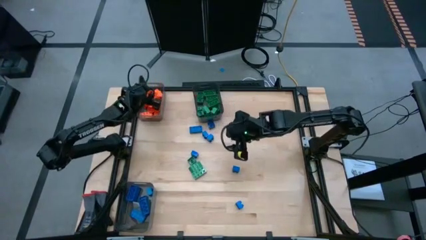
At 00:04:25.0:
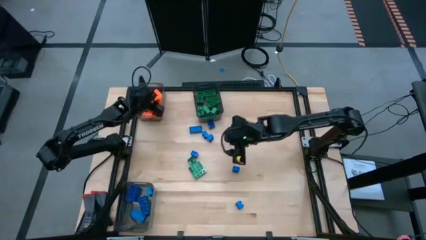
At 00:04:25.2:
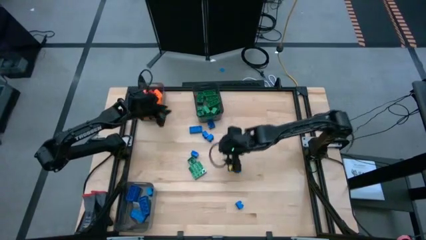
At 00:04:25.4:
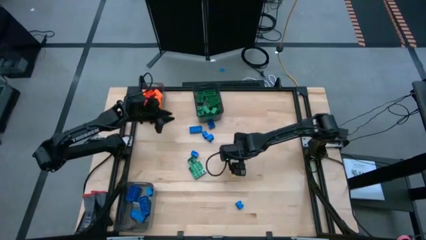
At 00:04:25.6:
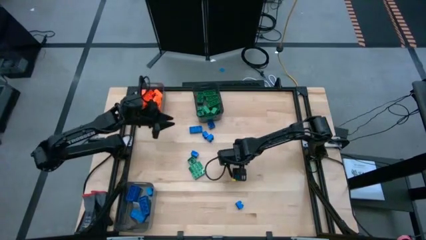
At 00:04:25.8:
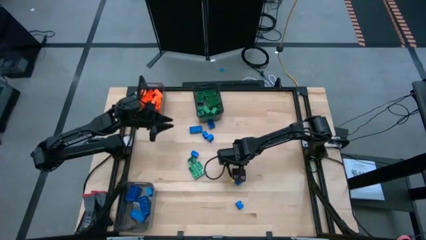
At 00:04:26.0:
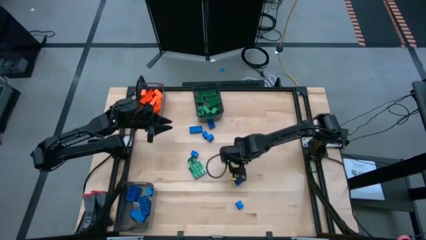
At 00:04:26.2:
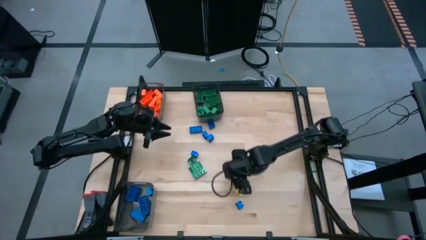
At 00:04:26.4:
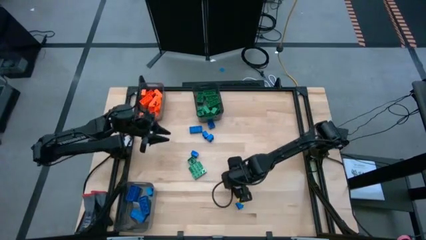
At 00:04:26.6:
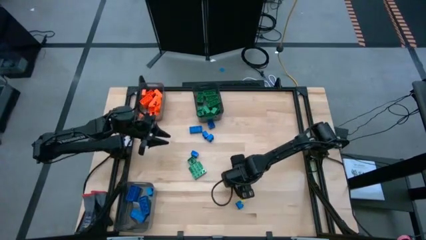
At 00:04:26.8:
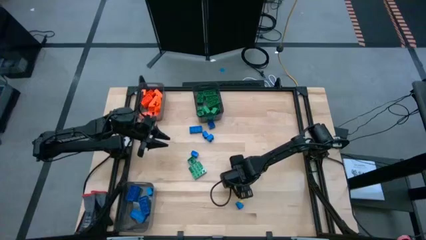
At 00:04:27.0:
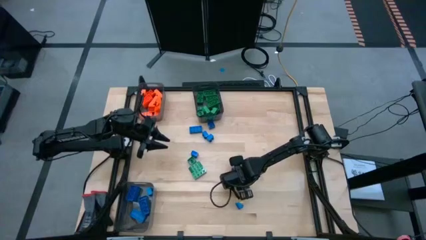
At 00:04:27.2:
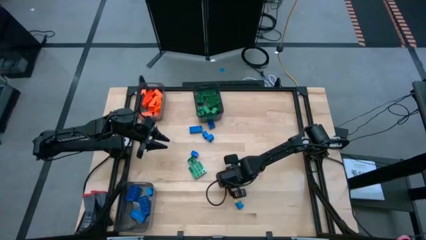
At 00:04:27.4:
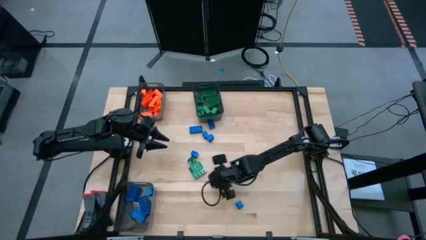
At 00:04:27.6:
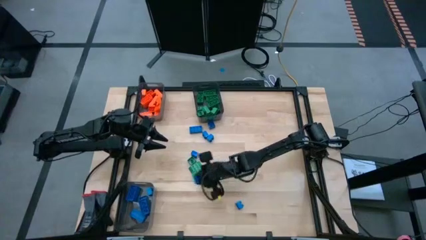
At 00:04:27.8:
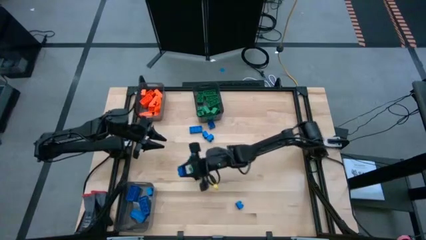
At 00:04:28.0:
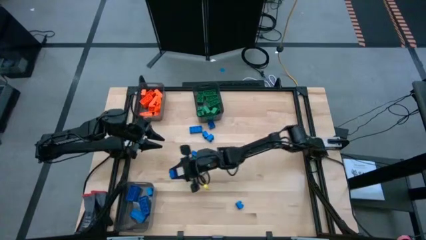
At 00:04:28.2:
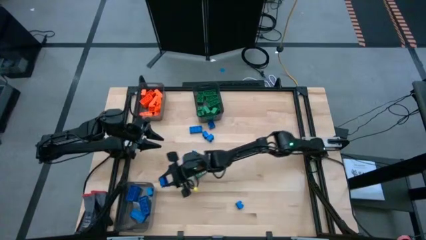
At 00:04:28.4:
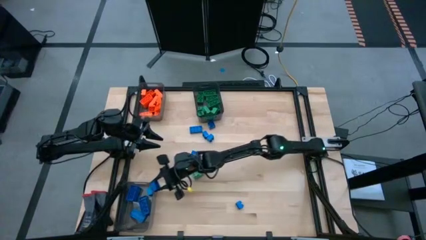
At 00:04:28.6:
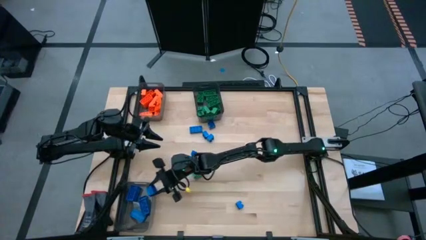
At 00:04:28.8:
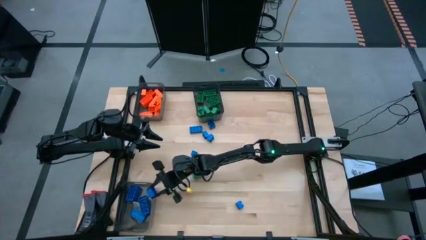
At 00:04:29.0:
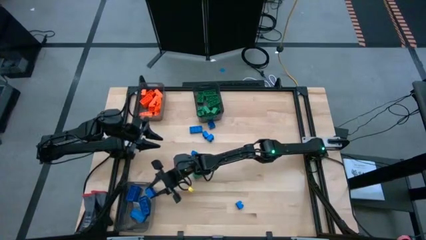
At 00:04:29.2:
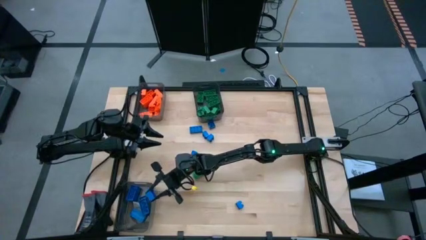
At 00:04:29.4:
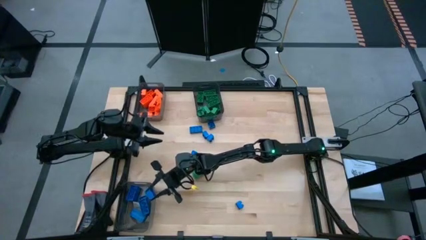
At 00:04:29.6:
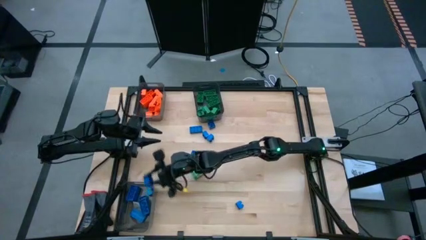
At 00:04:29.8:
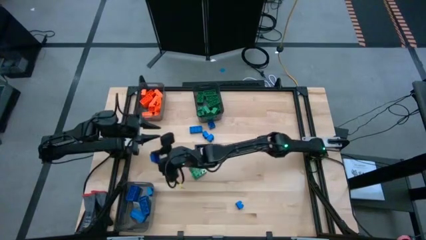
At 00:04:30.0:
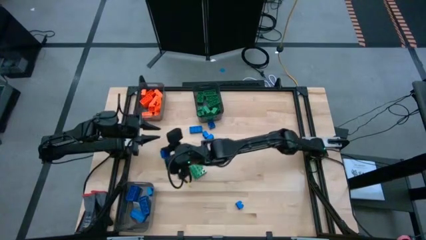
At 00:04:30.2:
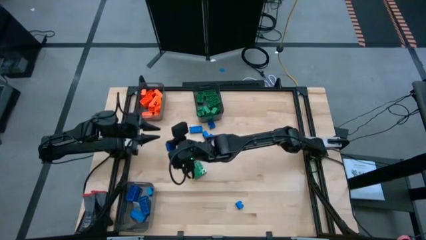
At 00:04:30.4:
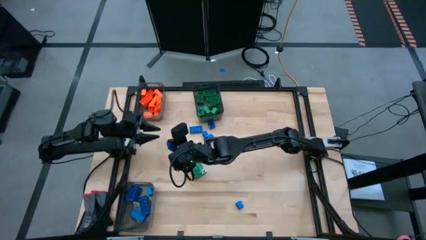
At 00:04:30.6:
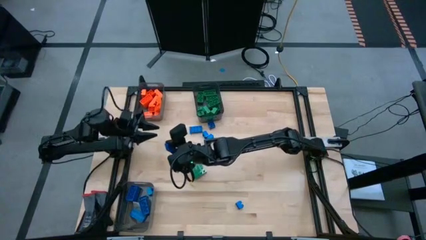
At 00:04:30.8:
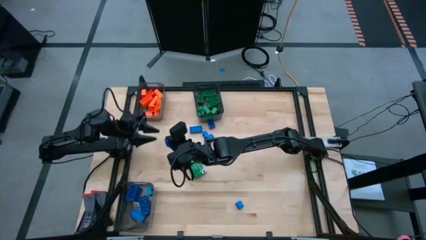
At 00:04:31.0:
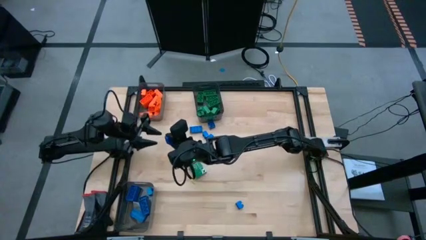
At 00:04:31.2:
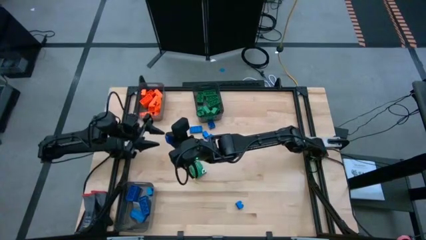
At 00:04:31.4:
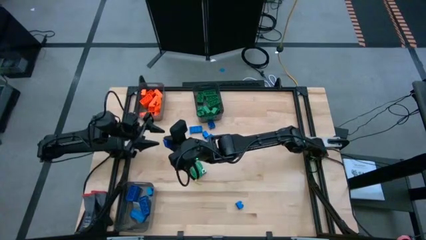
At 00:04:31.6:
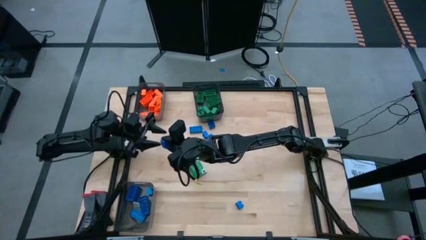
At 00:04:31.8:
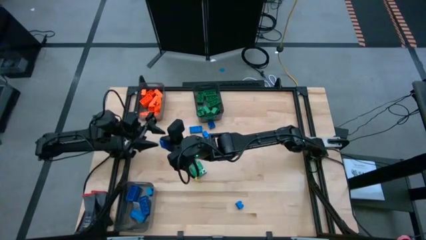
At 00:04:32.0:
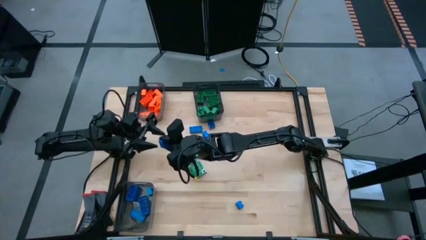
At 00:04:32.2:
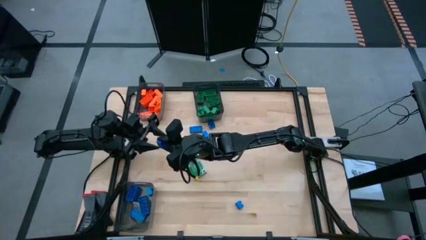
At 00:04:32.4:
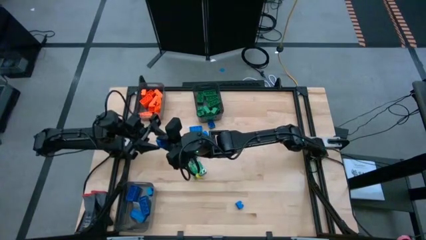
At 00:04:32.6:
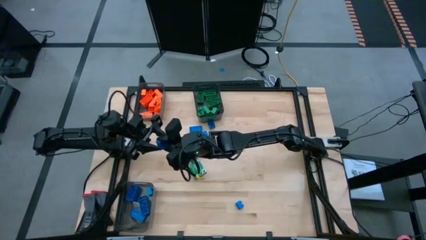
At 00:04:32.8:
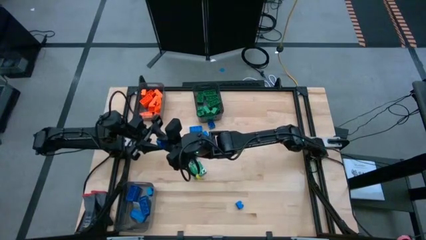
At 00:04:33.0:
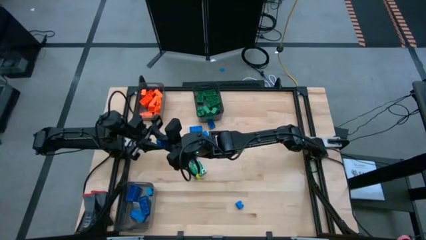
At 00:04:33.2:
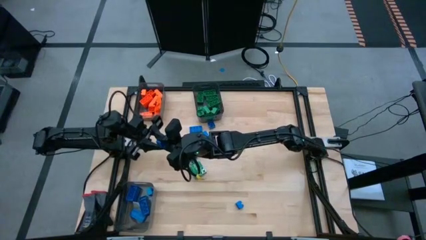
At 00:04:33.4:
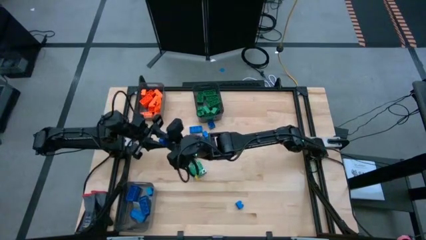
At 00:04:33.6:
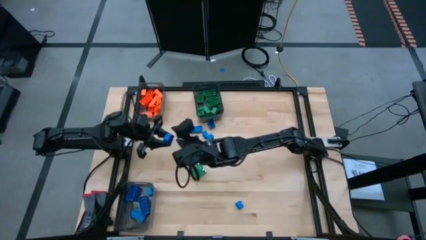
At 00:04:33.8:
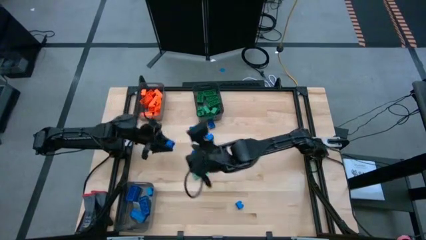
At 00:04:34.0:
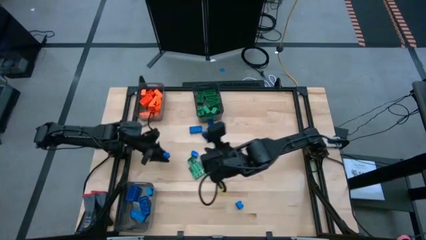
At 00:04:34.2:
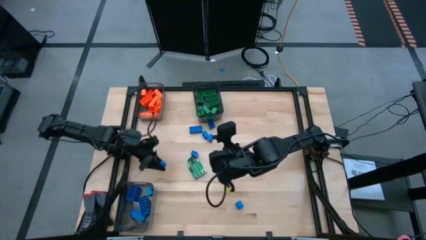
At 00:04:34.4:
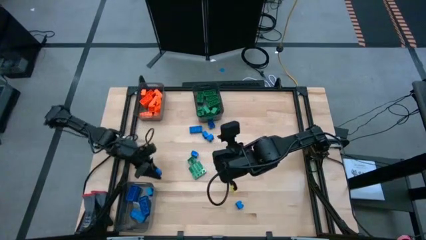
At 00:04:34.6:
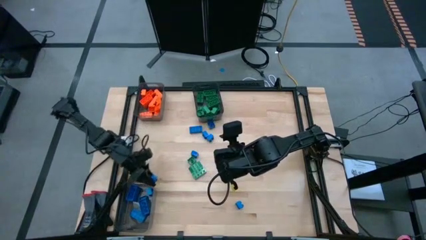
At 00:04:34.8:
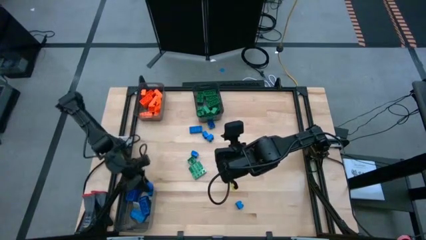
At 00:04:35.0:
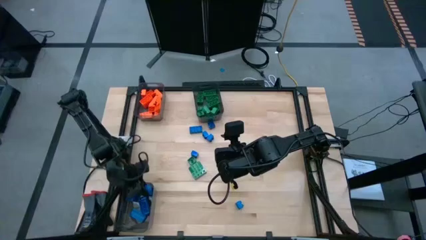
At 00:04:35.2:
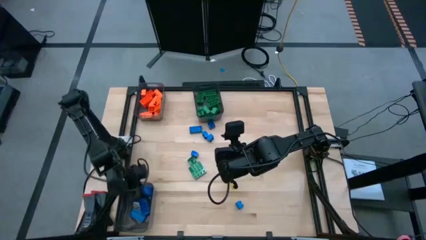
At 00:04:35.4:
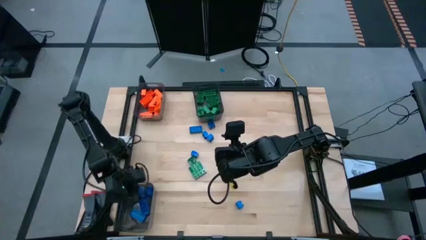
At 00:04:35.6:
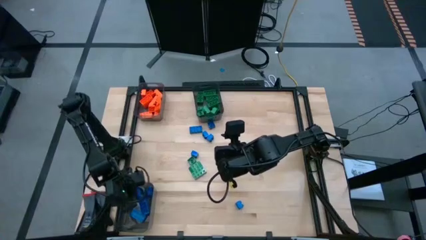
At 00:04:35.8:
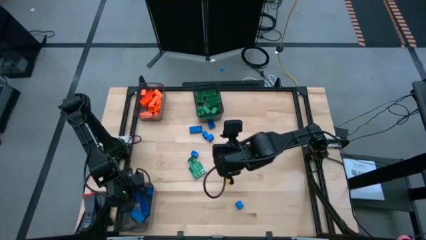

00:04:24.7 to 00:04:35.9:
Task: Sort blocks
Put the blue game piece into the bottom left black transparent bin

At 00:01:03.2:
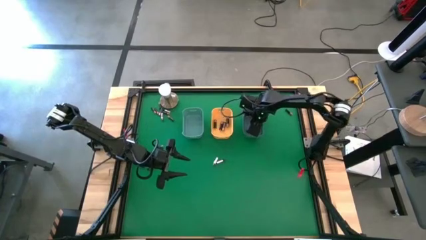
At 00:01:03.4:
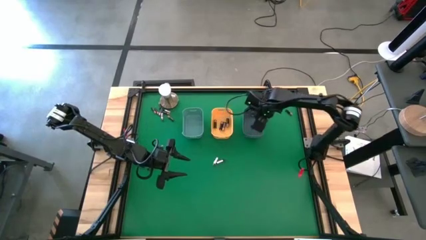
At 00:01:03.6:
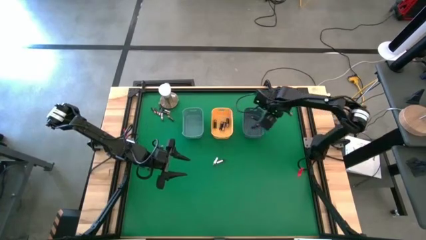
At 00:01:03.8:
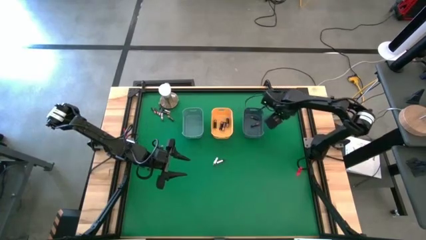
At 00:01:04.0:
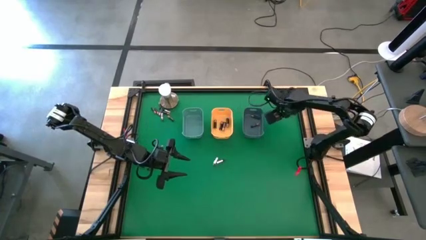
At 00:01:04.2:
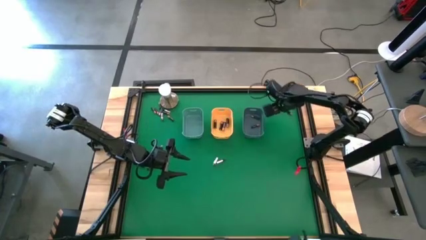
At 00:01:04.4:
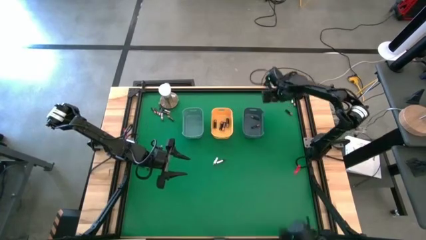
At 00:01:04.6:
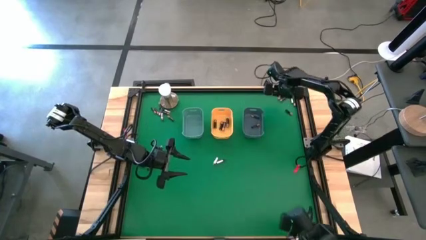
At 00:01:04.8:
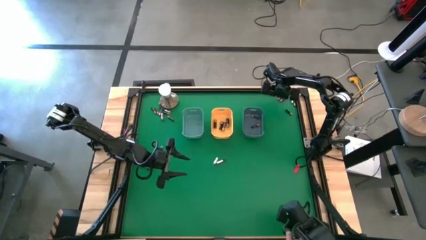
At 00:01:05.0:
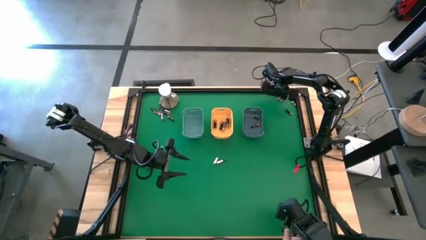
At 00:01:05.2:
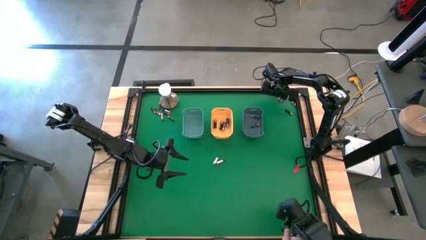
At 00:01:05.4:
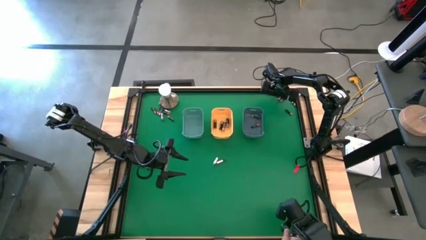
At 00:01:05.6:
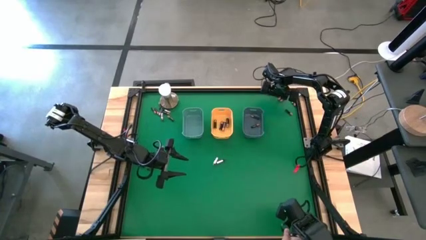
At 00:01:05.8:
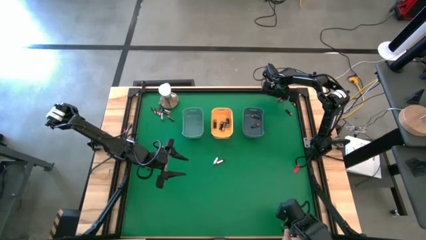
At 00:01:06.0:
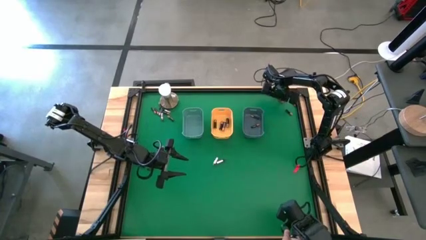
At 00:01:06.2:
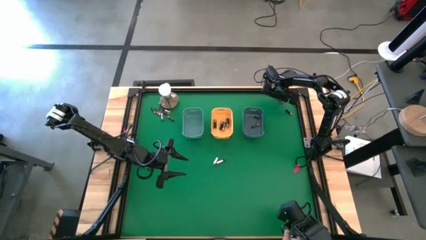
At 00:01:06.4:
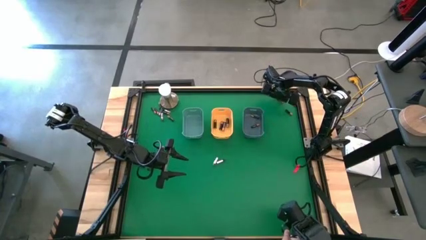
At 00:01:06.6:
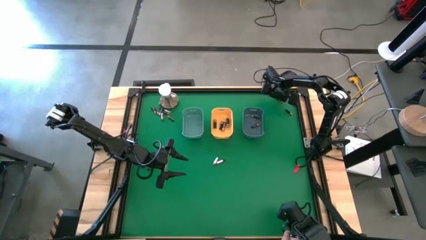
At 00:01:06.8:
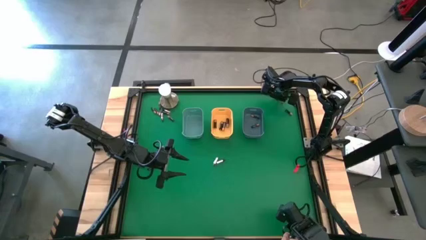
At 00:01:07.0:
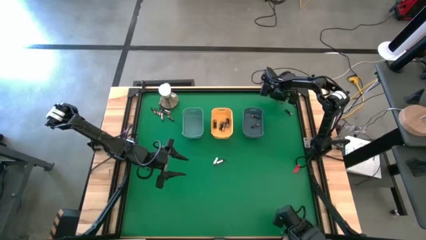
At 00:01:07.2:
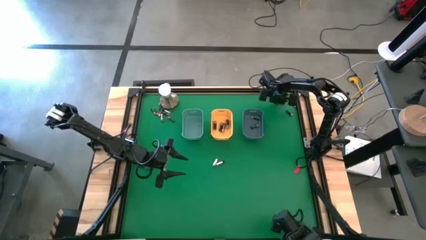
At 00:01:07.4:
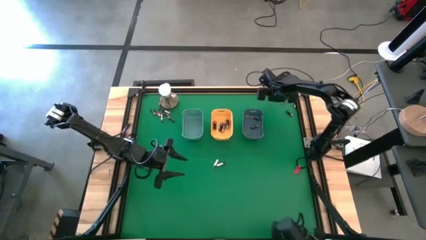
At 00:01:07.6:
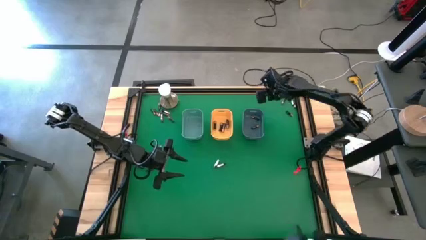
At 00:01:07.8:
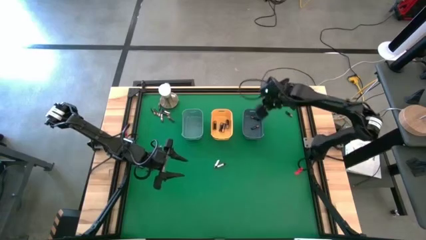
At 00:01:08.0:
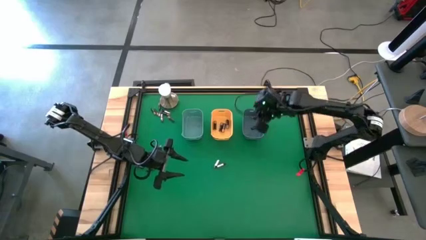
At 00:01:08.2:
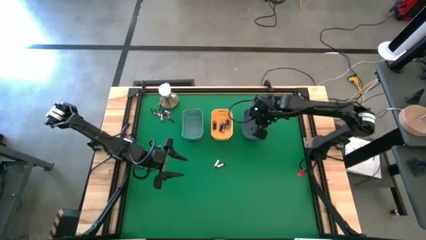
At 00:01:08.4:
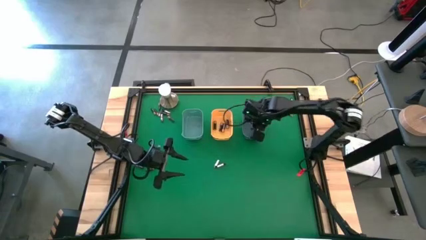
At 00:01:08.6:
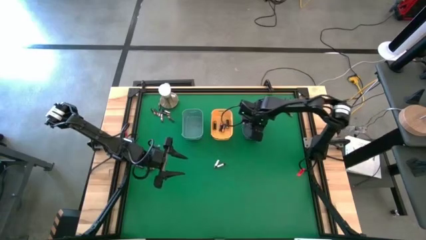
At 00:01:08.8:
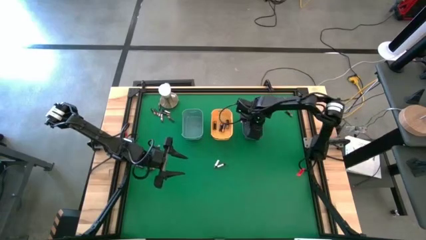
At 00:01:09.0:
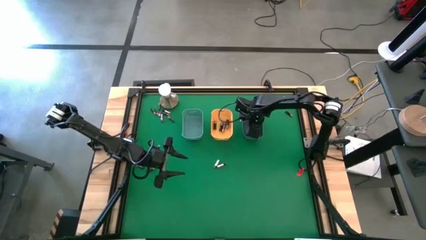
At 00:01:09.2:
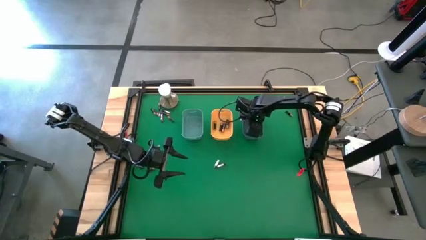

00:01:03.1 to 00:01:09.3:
Task: Sort batteries
Put the small black battery into the blue bin
